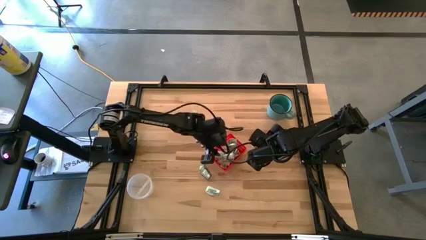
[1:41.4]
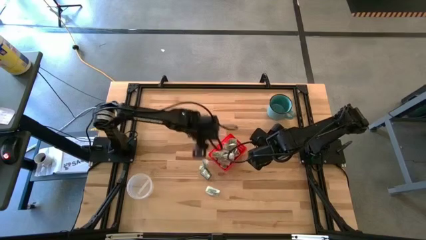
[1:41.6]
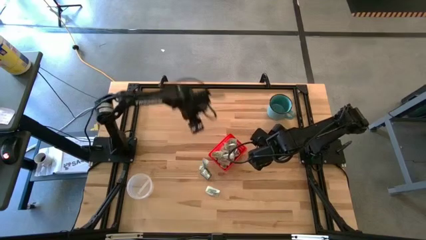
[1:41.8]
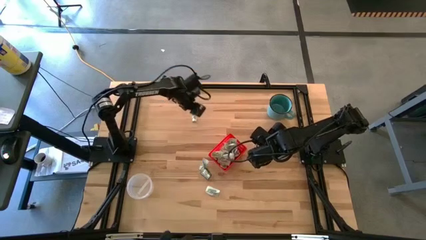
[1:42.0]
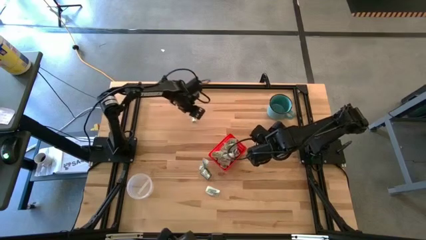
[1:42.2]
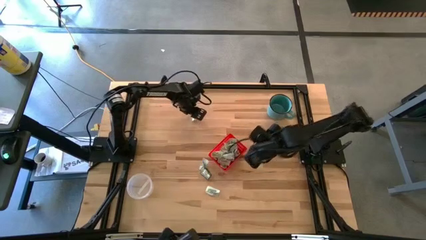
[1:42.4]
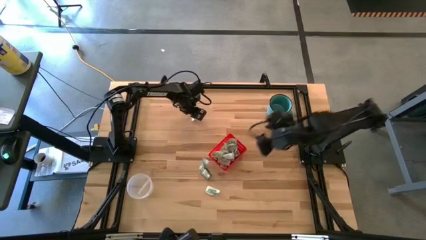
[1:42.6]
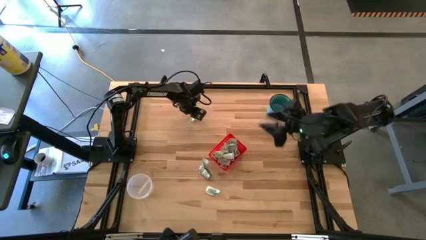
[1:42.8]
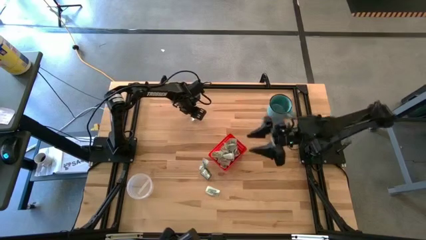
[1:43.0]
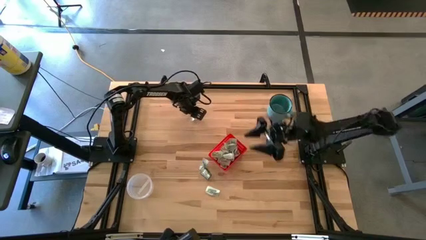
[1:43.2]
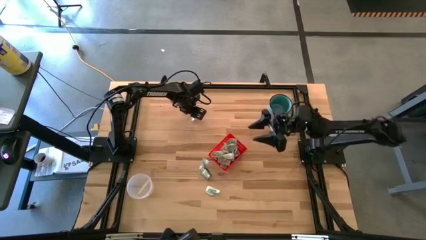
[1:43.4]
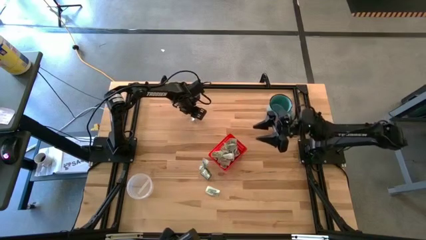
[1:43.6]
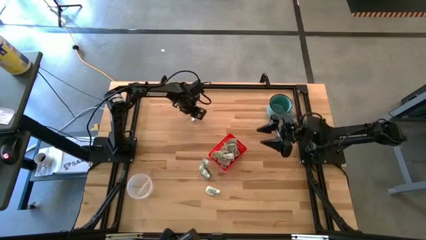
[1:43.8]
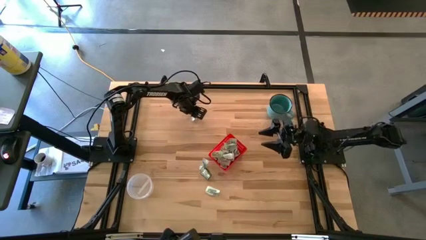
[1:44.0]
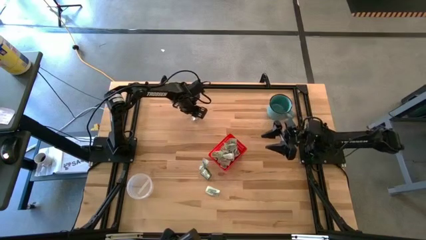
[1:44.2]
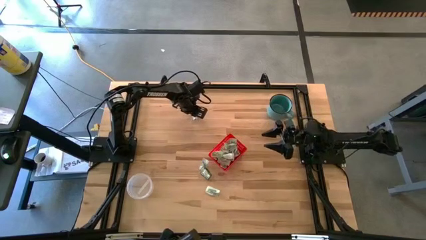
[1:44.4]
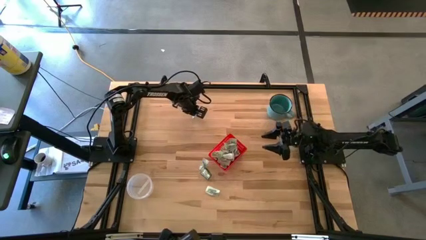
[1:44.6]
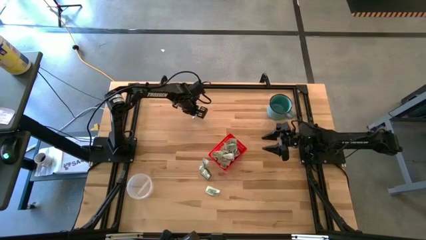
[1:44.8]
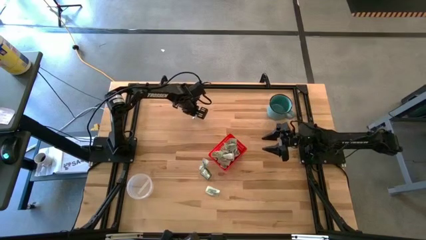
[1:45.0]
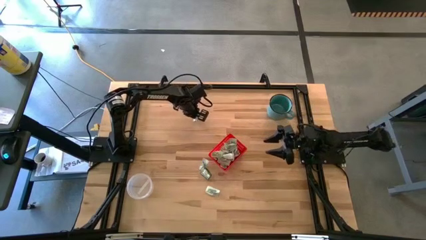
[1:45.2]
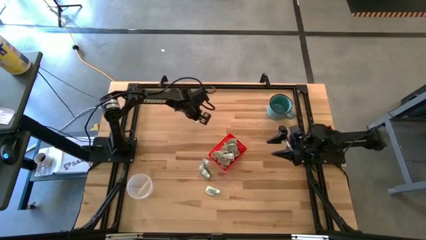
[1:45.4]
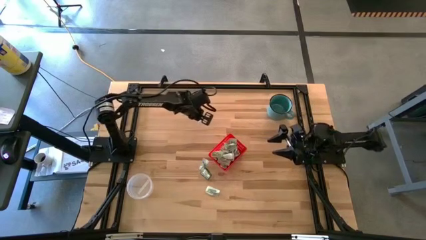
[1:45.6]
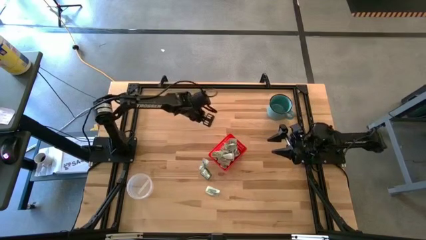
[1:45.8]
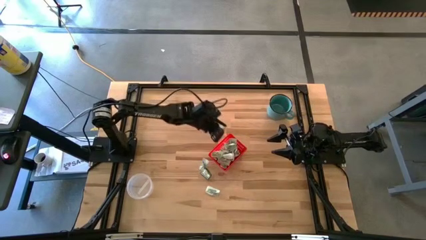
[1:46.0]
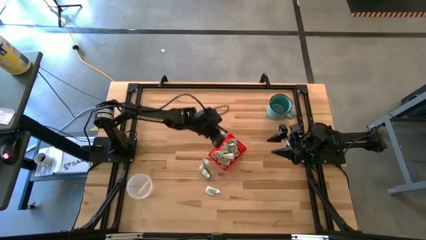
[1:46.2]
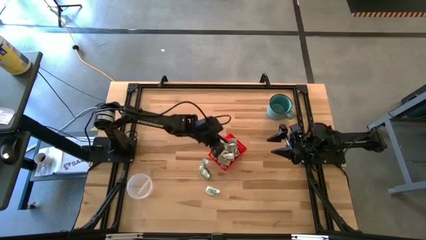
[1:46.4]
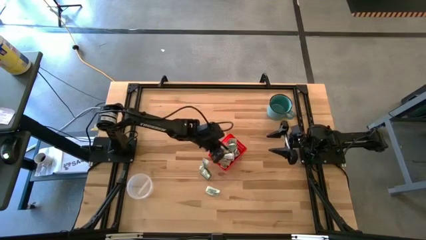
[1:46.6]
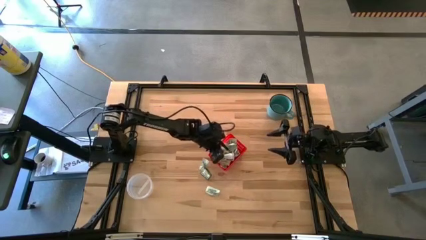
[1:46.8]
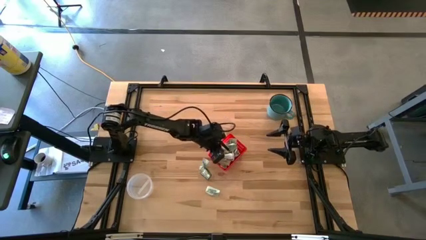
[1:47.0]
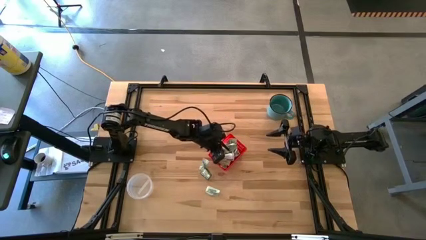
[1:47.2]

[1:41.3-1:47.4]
Task: Pick and place items into bin
Put the top white stevia pack into the red bin

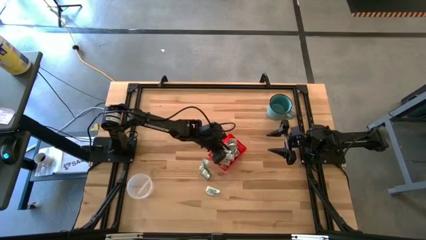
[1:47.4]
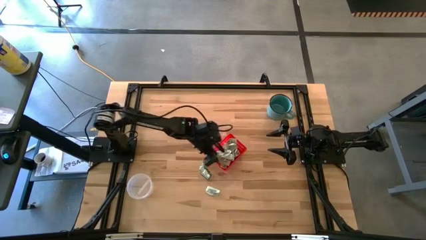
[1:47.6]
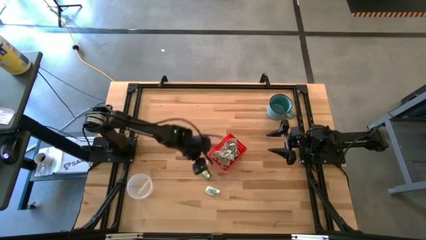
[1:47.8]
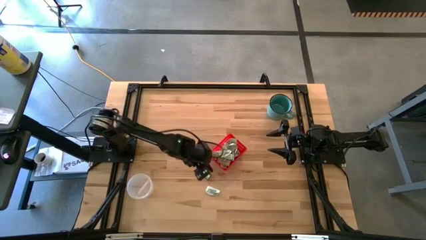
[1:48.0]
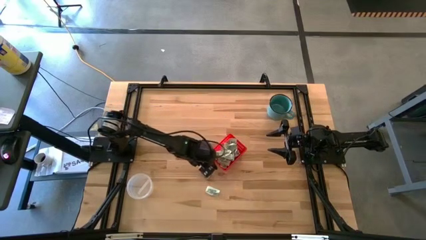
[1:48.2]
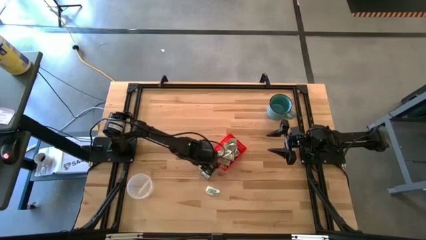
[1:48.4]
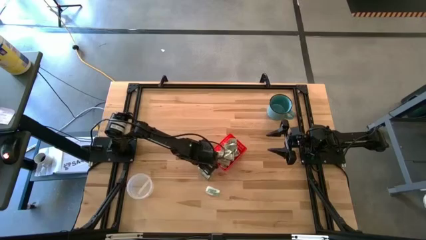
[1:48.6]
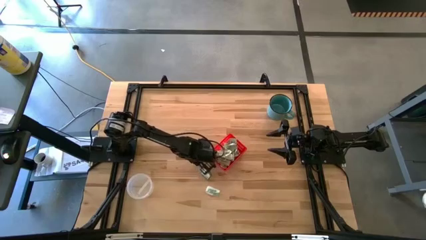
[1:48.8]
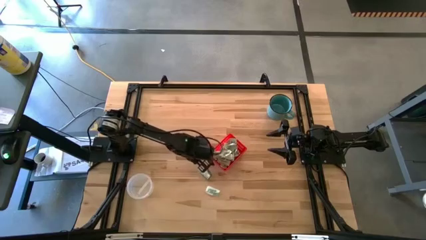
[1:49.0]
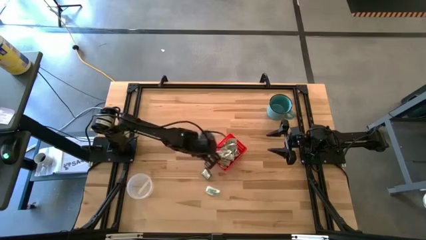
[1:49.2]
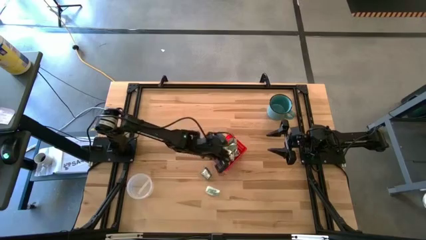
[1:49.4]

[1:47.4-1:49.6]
Put the top white stevia pack into the red bin

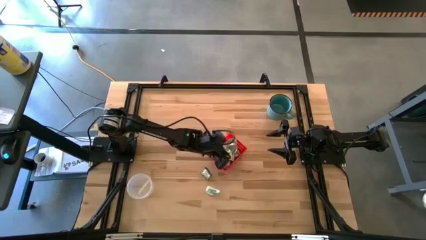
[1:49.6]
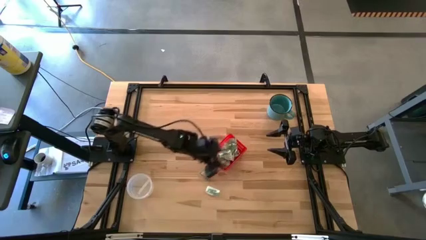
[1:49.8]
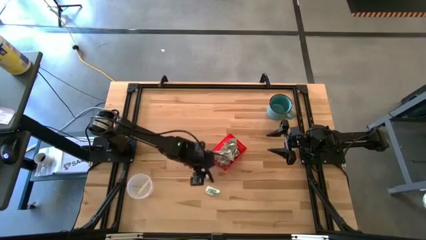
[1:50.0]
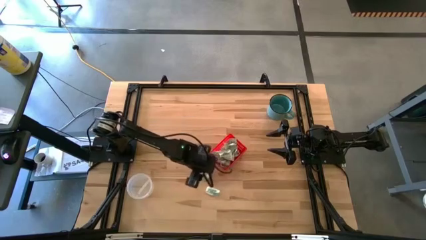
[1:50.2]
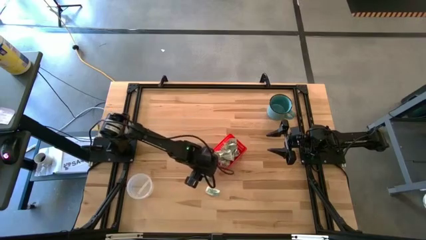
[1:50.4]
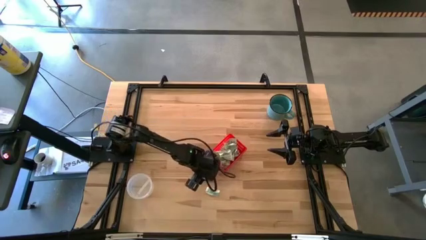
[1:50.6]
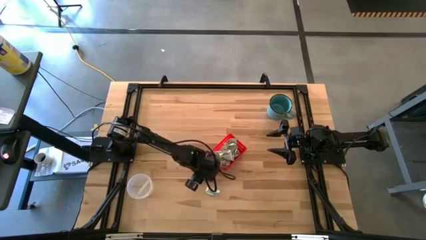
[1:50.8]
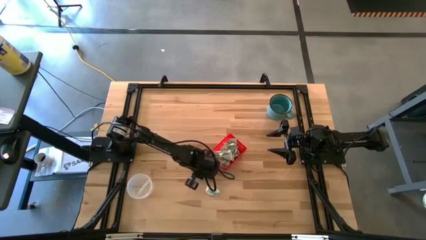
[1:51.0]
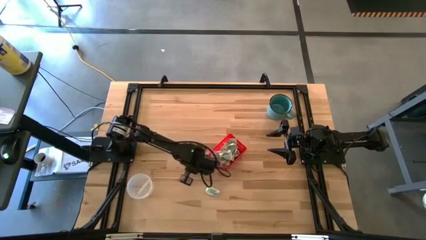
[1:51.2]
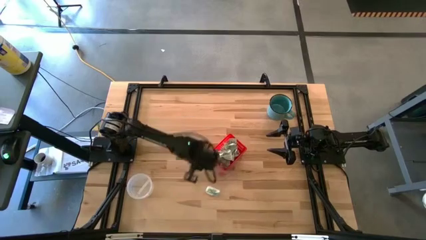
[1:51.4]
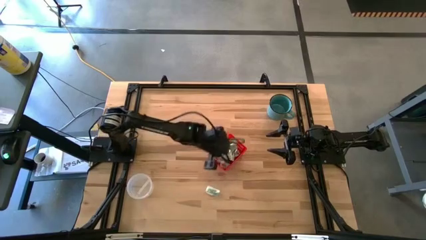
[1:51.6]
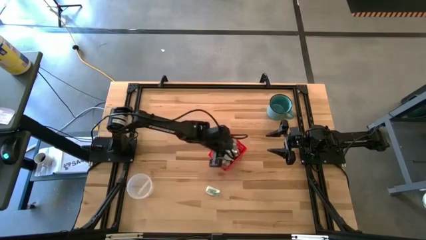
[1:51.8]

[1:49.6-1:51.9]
Put the green stevia pack into the red bin

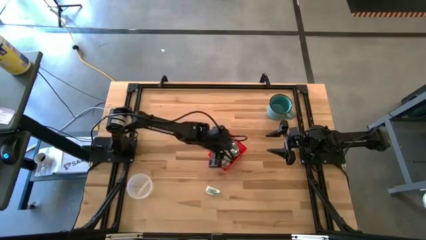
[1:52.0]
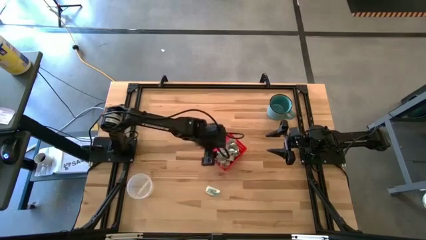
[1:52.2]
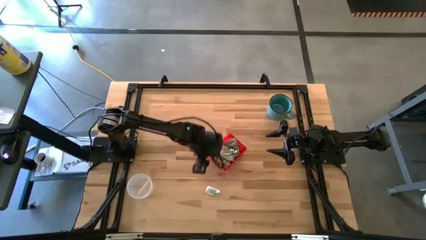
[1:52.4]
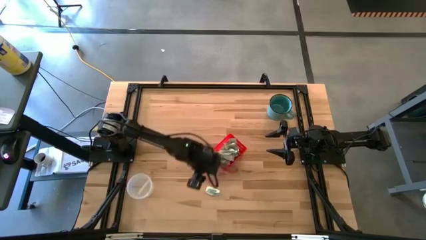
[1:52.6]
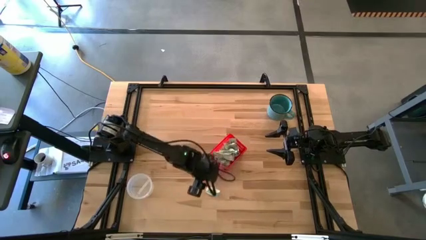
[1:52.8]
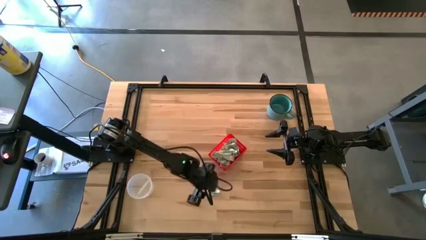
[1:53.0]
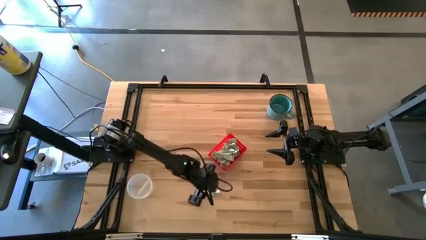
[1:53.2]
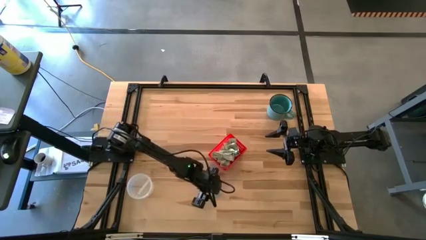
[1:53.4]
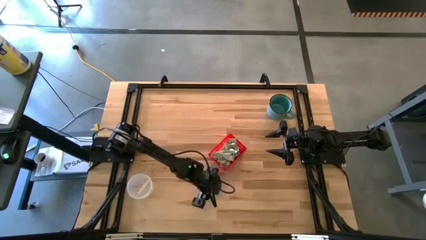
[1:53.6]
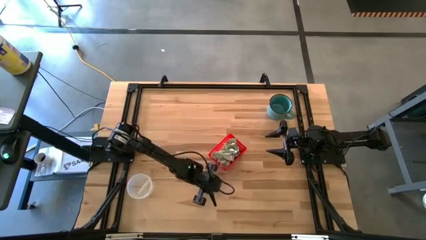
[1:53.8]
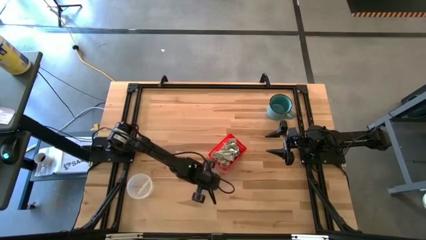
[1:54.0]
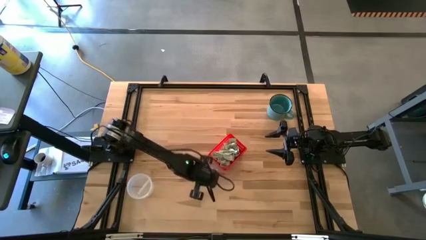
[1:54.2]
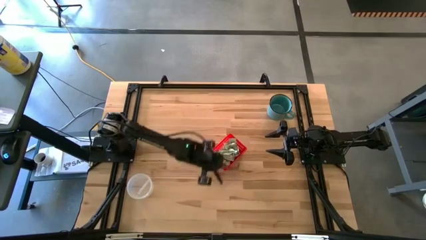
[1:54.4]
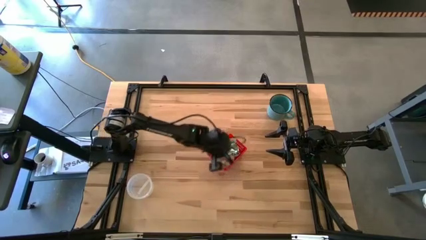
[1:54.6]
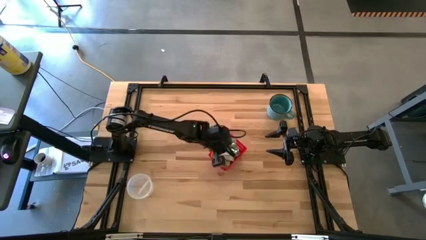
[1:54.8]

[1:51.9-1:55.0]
Put the white stevia pack into the red bin

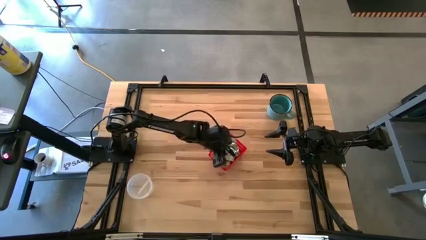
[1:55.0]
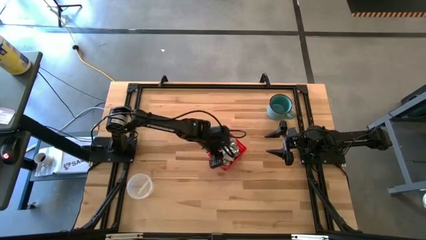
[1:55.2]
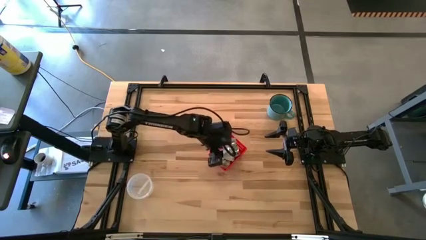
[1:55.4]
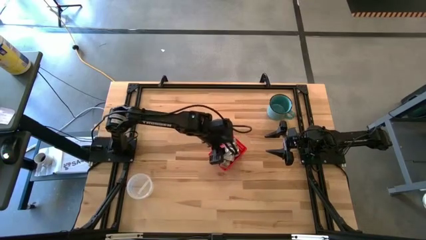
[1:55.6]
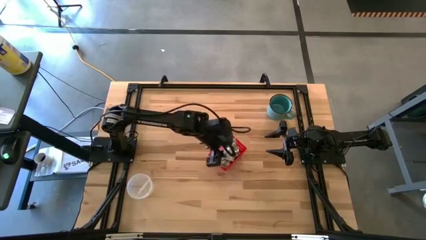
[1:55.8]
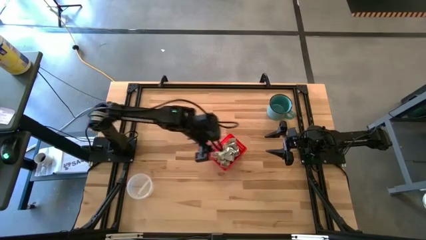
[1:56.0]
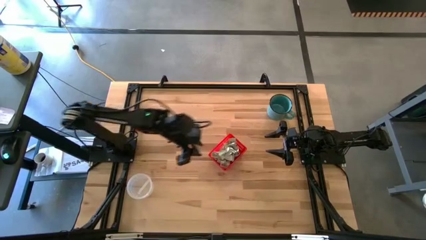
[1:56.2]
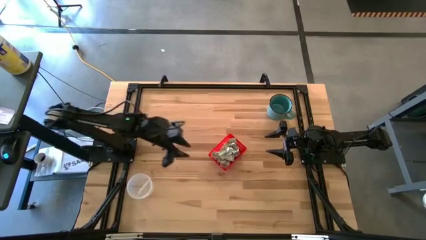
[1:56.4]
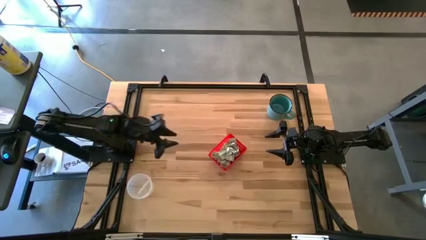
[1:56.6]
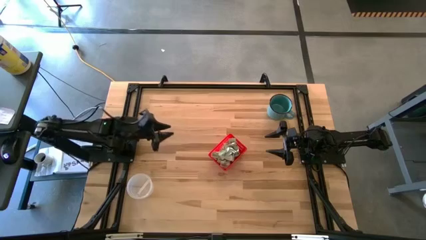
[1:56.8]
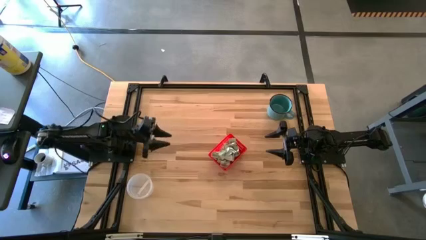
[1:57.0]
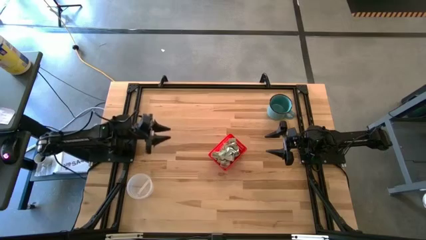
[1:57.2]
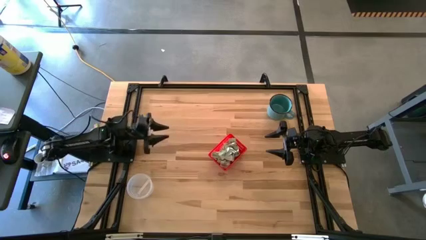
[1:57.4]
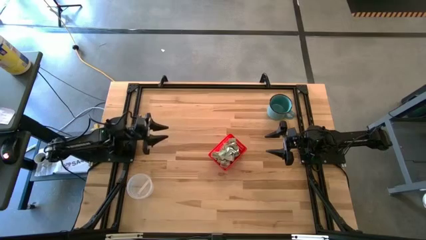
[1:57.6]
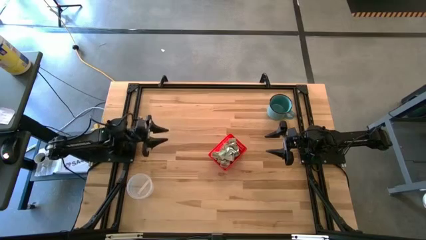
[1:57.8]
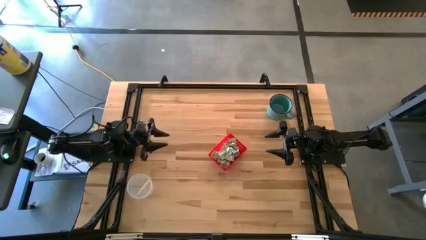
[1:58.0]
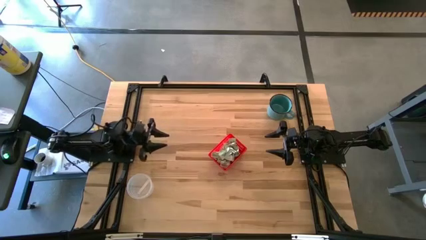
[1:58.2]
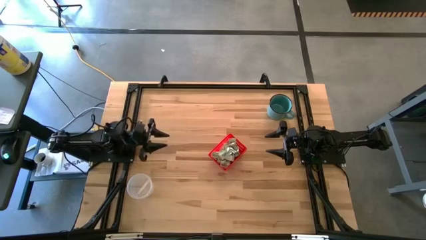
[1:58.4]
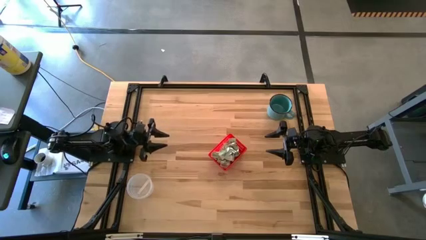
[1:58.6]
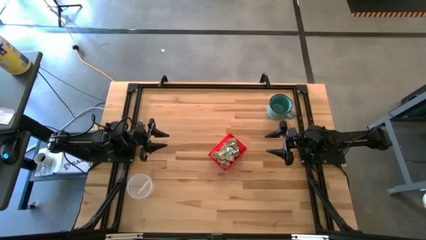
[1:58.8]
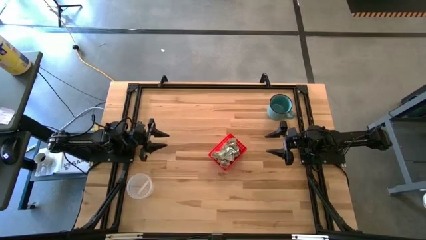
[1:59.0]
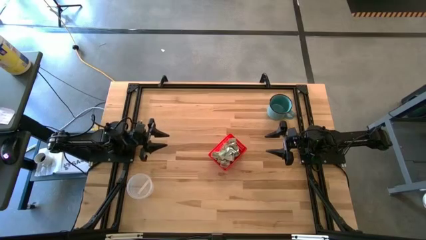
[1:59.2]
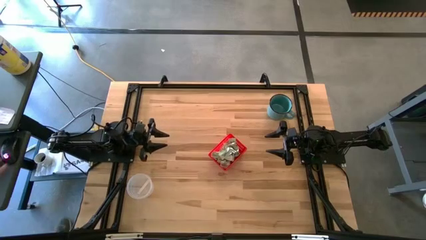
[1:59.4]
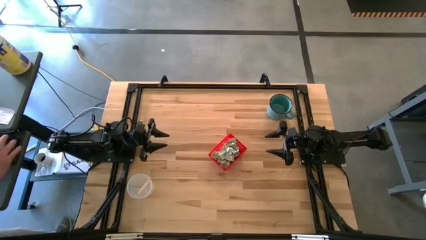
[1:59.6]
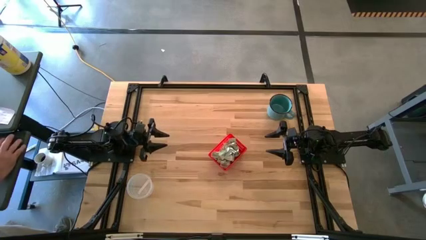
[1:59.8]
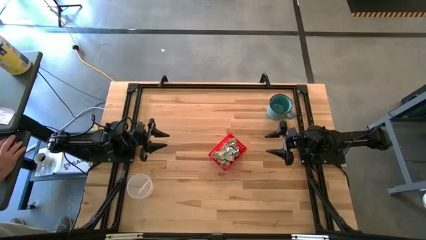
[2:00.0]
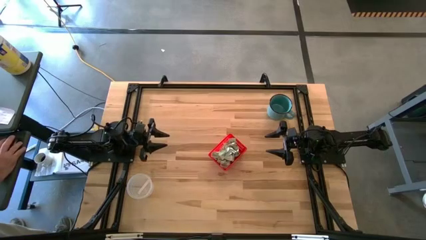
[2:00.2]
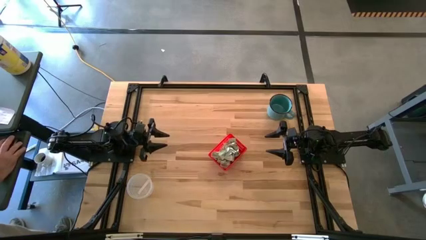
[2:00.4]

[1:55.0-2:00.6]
Return to Home Position
